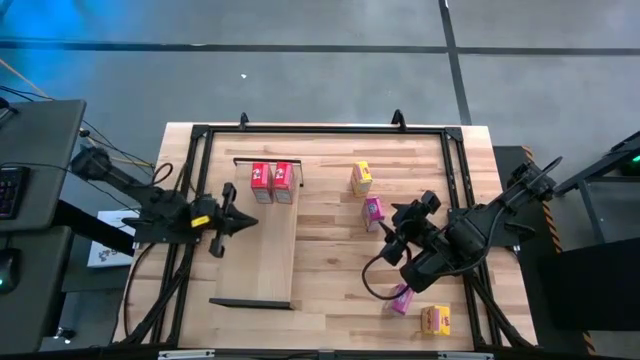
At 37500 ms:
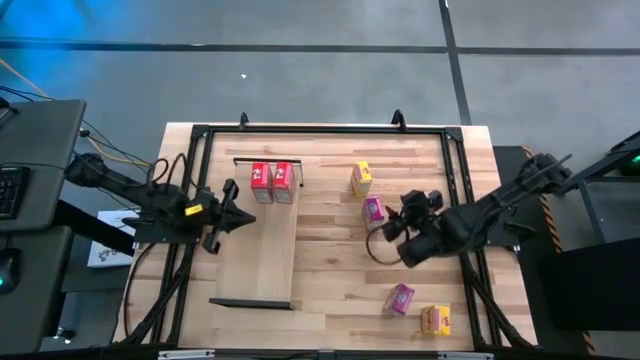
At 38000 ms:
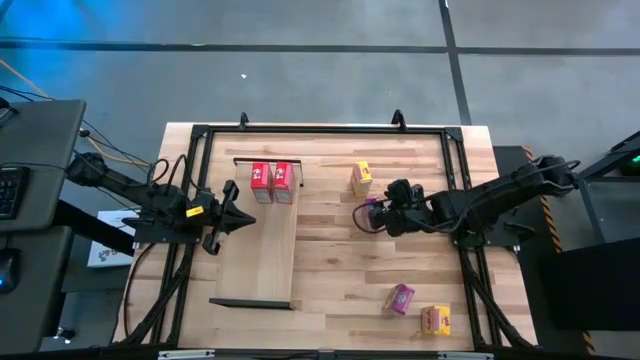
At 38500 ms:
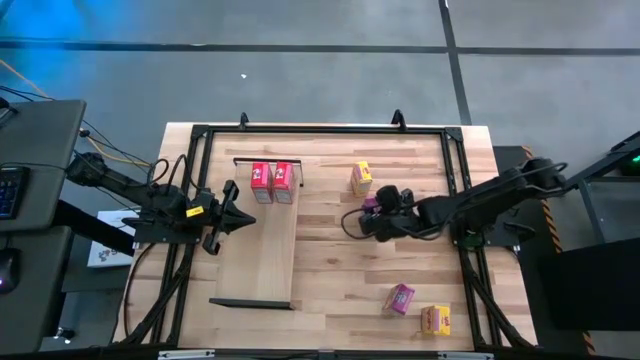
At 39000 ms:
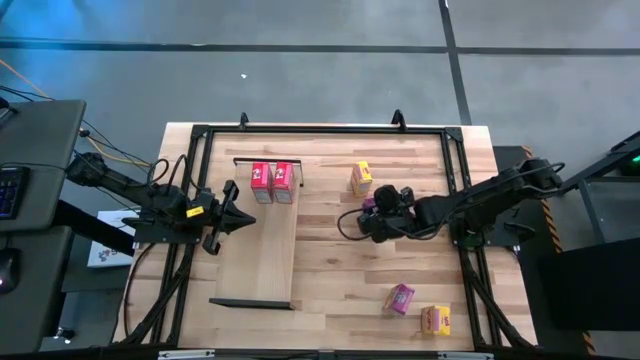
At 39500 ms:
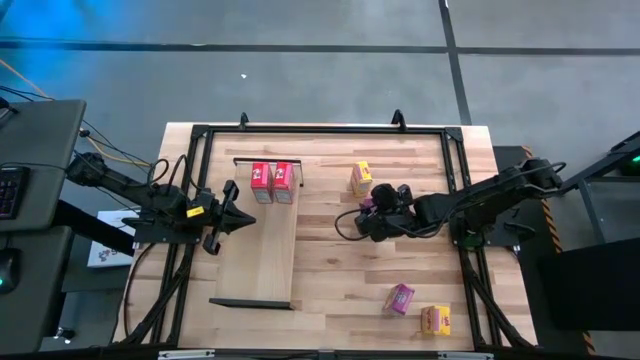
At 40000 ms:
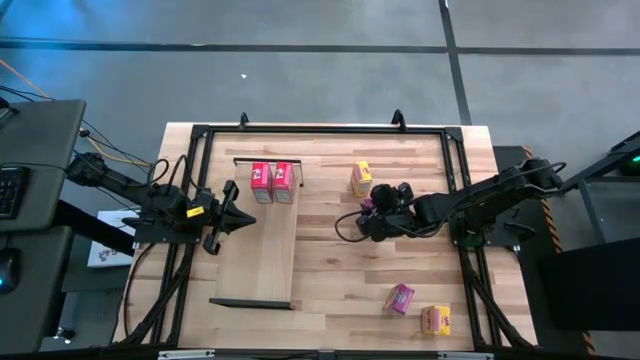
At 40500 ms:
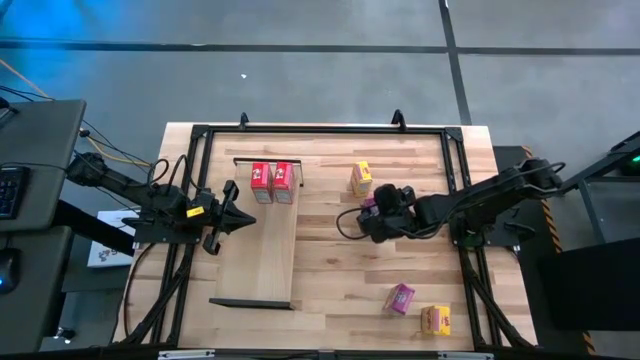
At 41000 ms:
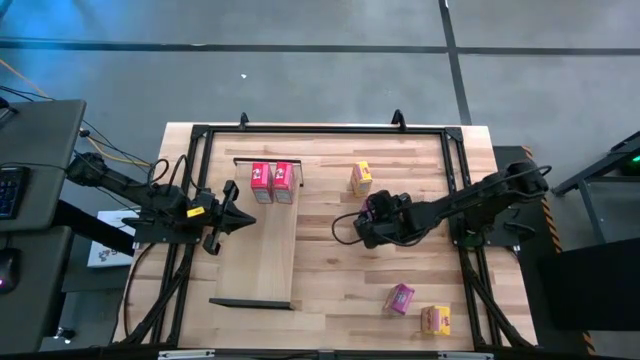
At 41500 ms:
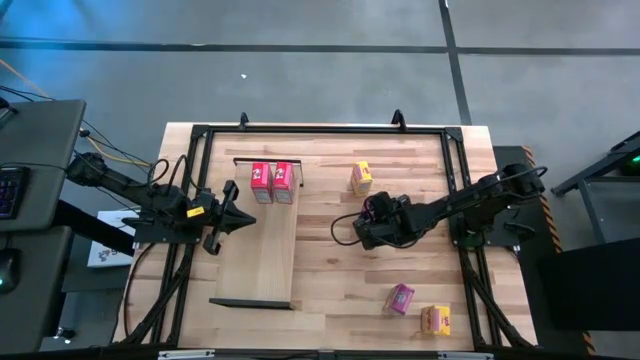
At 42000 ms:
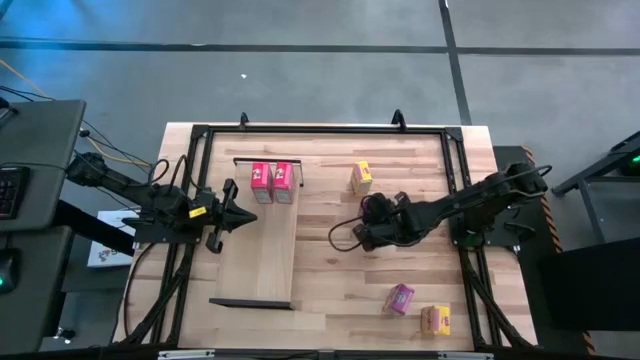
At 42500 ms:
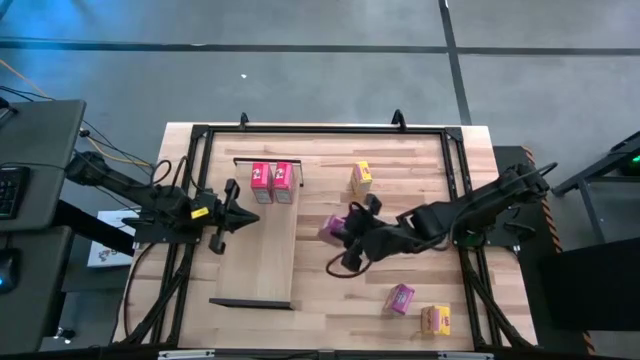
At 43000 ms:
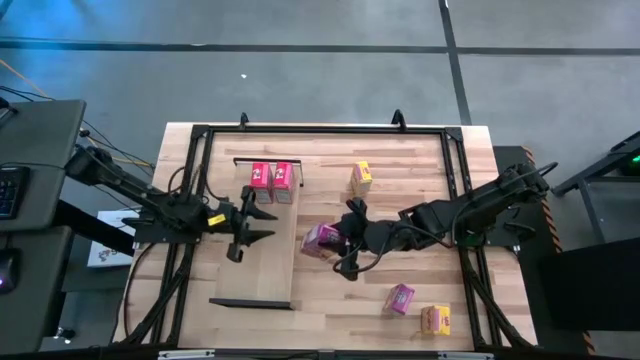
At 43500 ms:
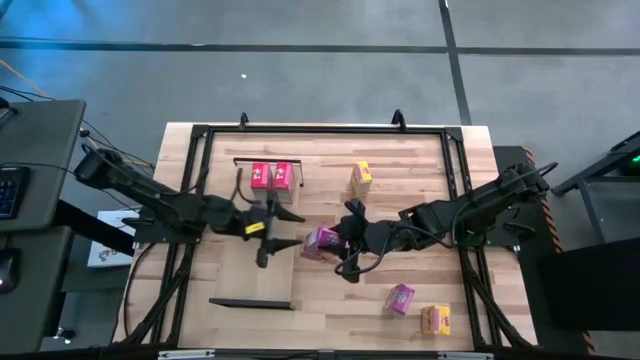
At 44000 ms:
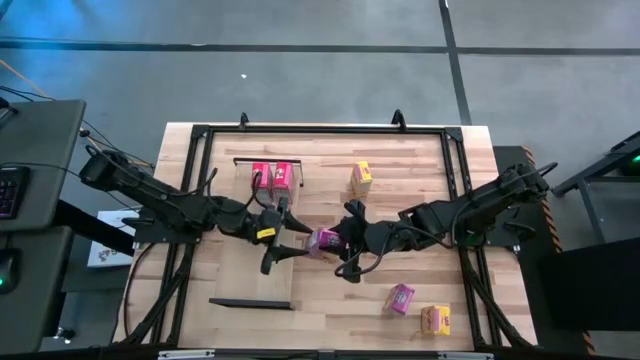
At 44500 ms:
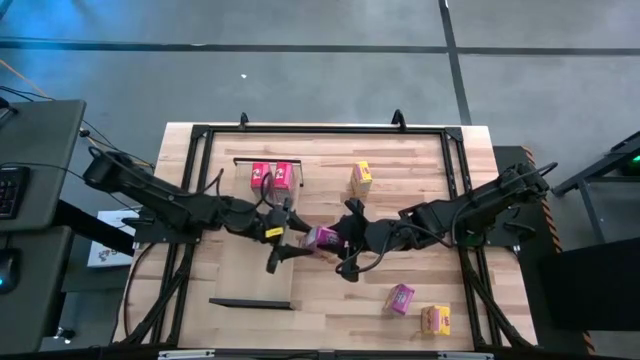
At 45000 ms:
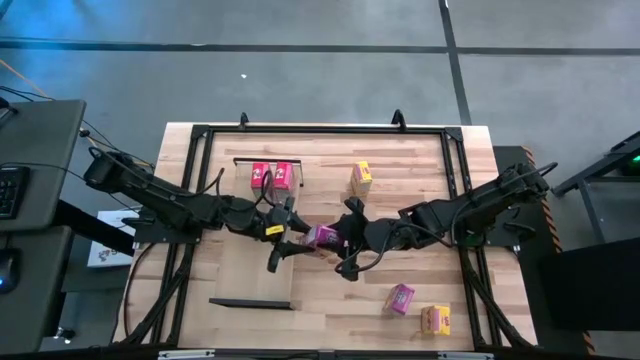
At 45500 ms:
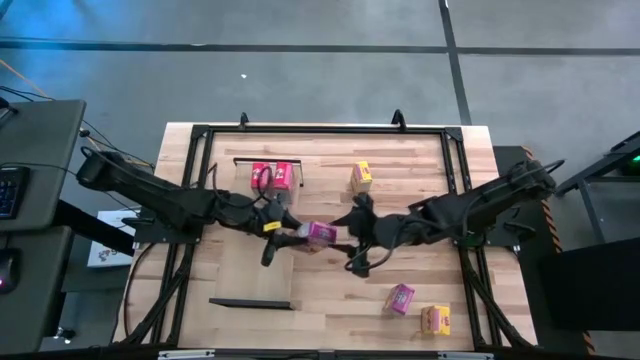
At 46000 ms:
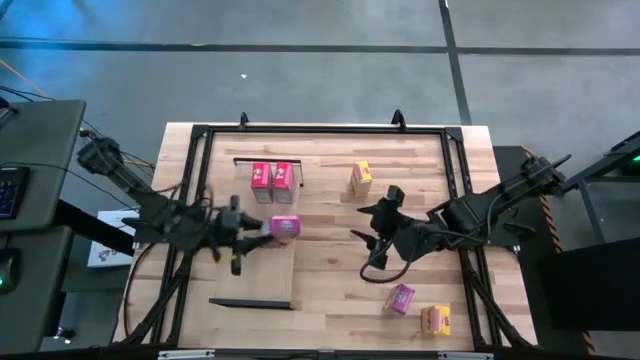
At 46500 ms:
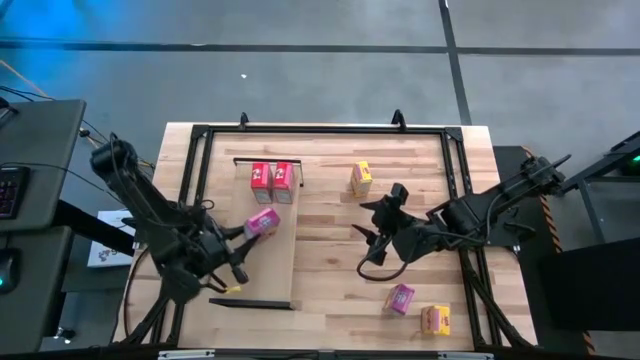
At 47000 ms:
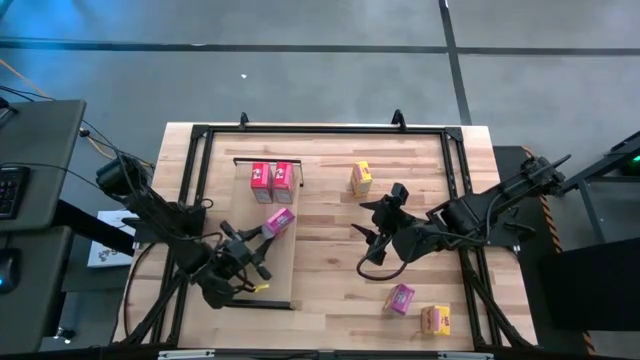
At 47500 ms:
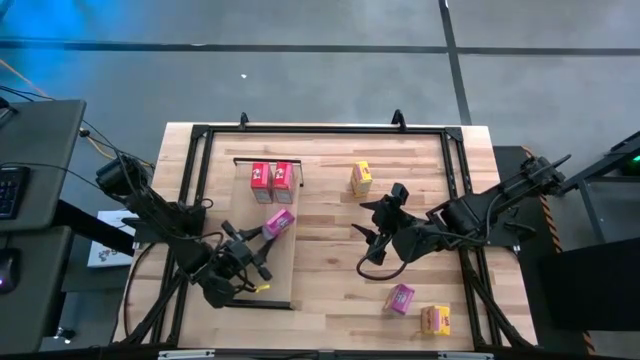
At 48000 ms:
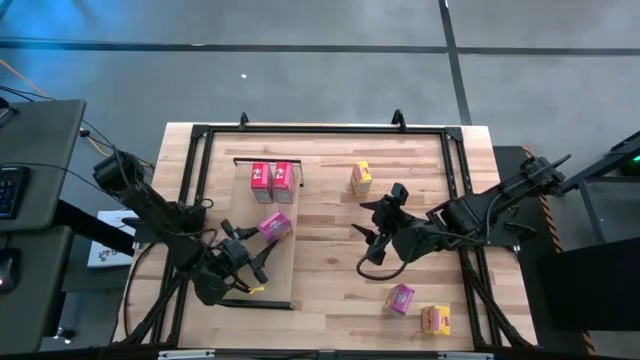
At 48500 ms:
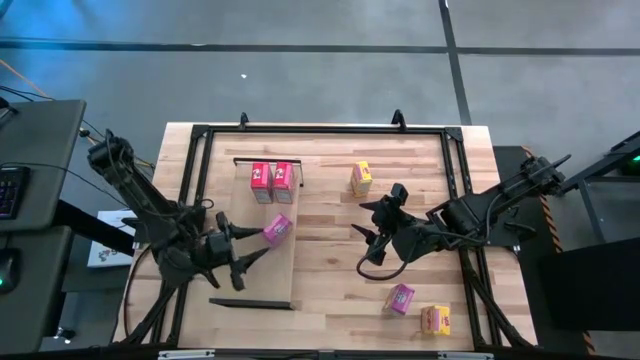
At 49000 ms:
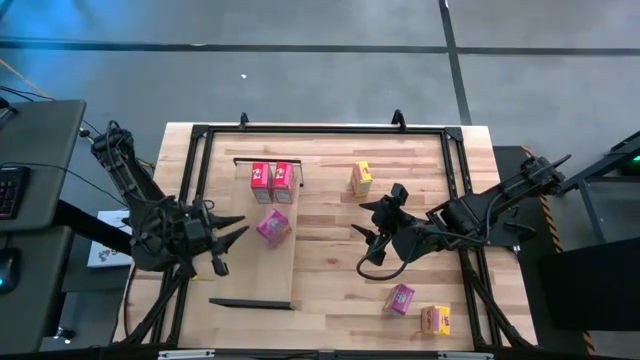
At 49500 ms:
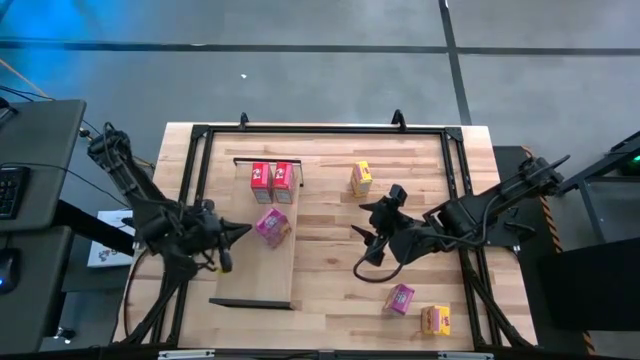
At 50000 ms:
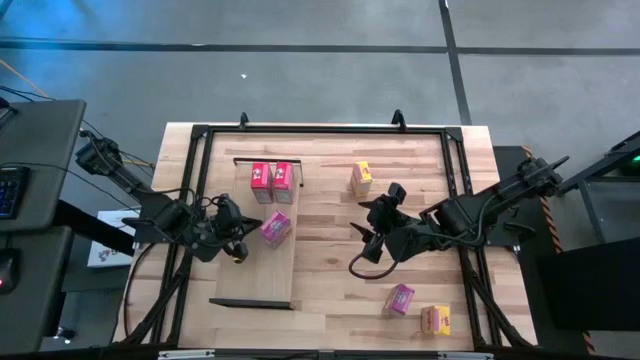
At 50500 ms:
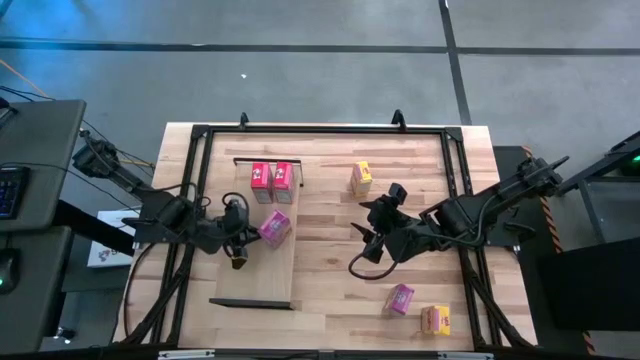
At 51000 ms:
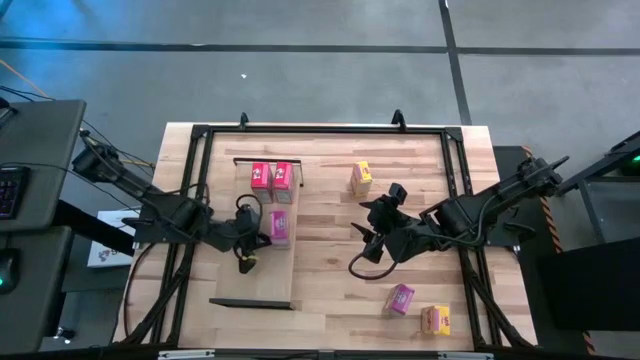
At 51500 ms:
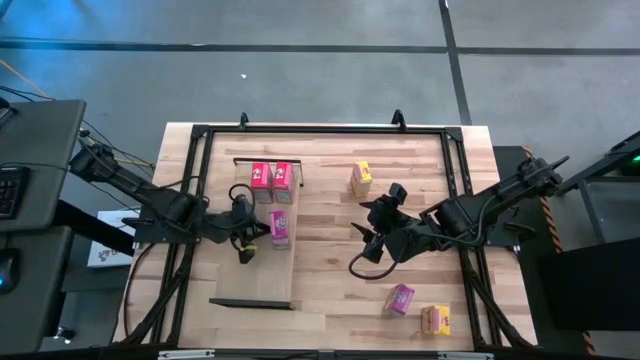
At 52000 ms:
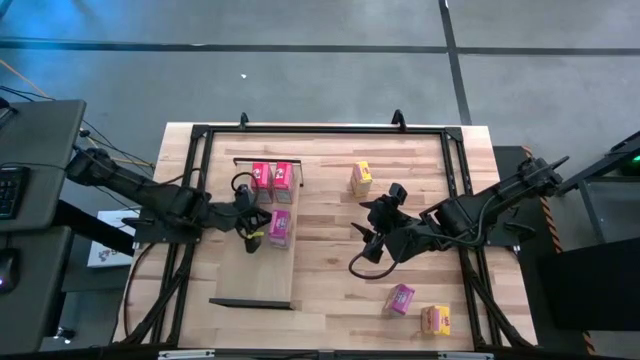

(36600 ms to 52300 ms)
Task: Stack cereal on shelf
Put the top purple cereal box on the shelf
